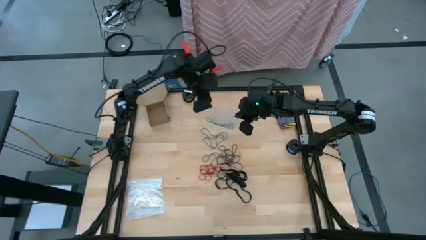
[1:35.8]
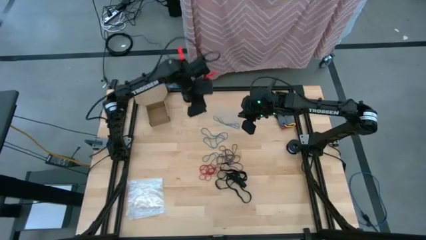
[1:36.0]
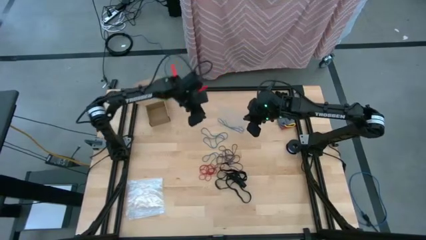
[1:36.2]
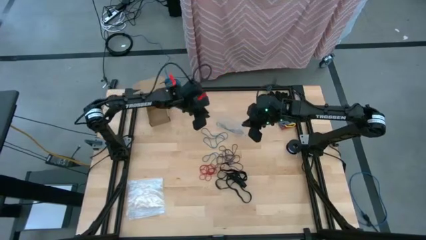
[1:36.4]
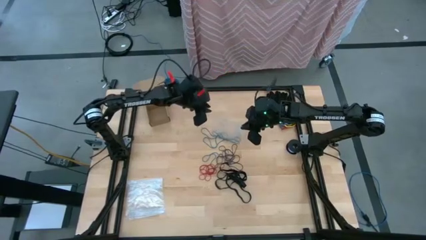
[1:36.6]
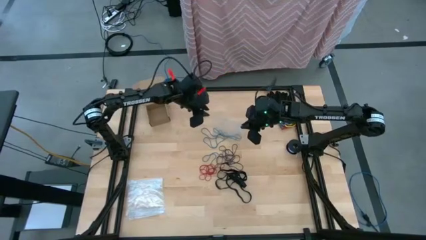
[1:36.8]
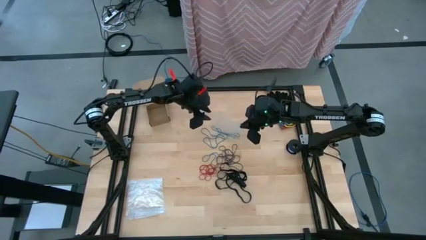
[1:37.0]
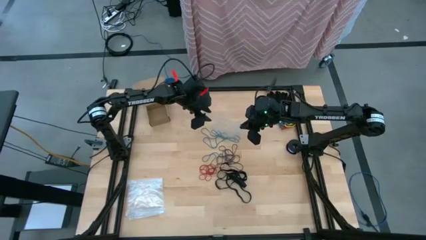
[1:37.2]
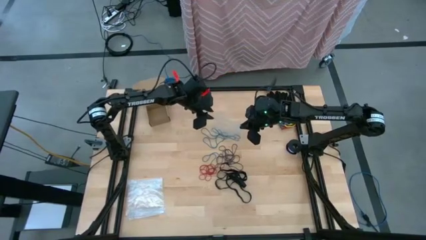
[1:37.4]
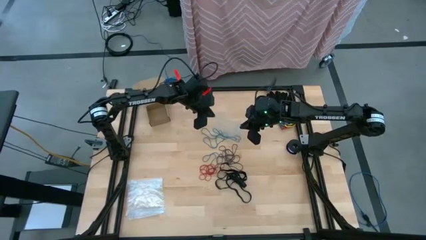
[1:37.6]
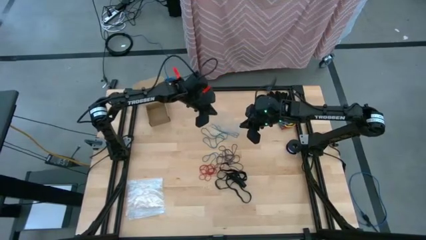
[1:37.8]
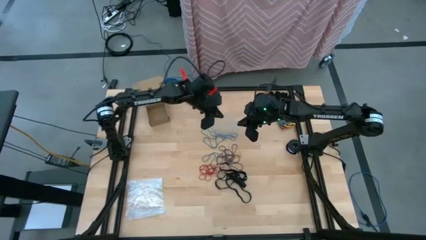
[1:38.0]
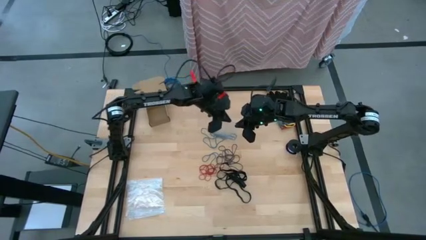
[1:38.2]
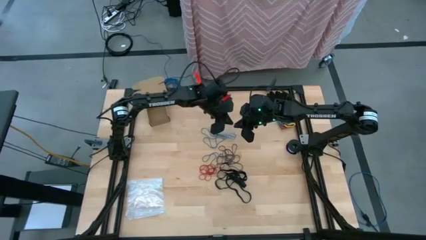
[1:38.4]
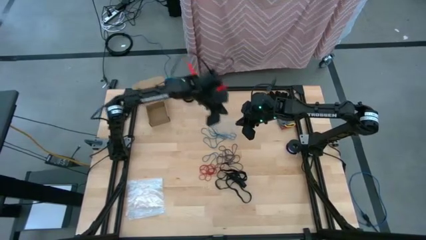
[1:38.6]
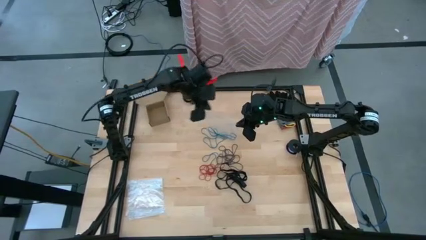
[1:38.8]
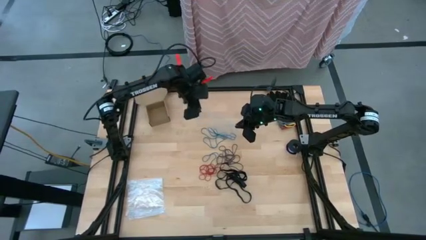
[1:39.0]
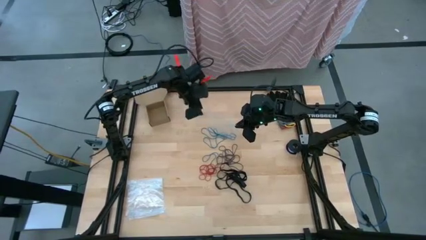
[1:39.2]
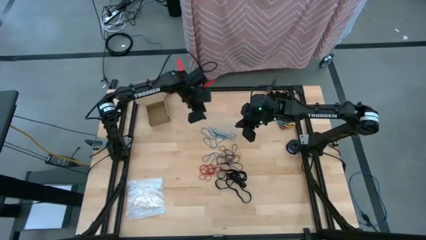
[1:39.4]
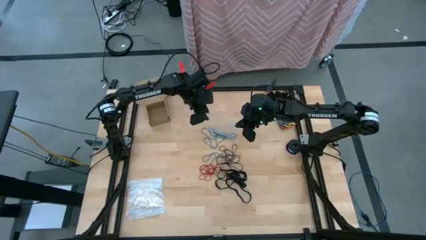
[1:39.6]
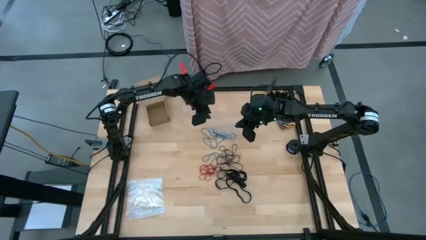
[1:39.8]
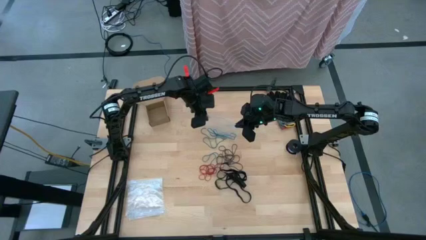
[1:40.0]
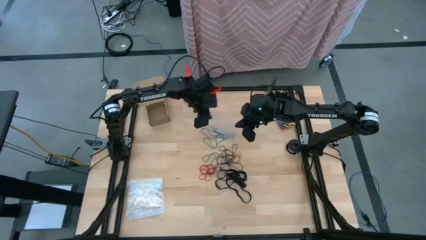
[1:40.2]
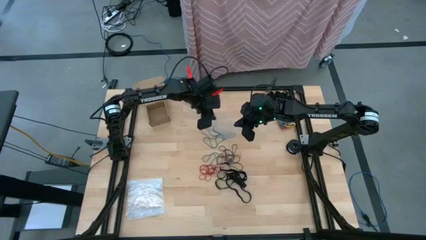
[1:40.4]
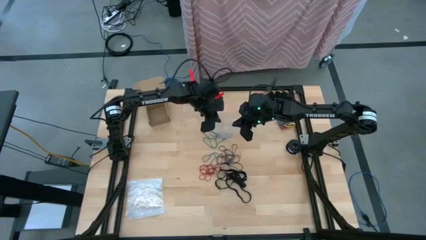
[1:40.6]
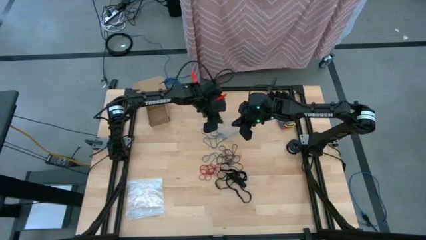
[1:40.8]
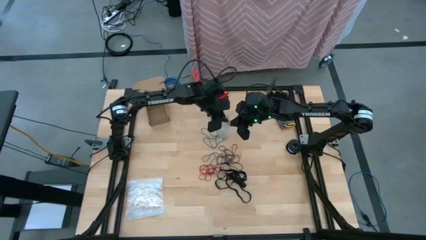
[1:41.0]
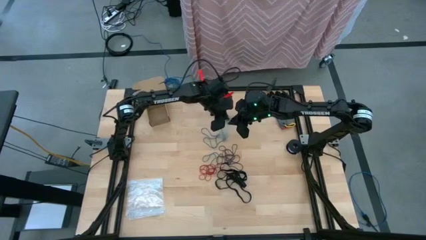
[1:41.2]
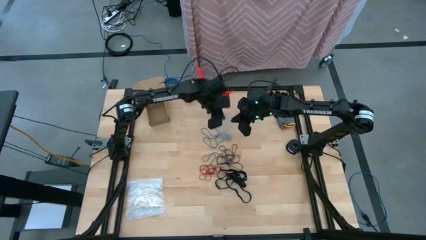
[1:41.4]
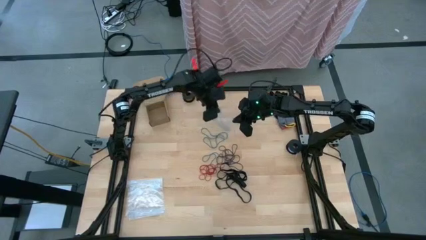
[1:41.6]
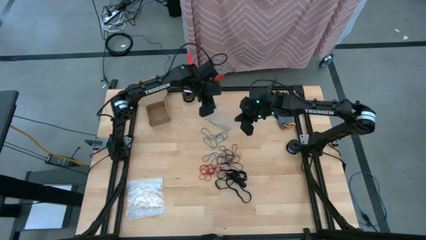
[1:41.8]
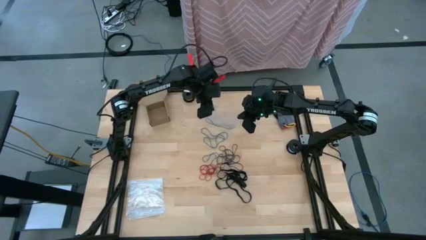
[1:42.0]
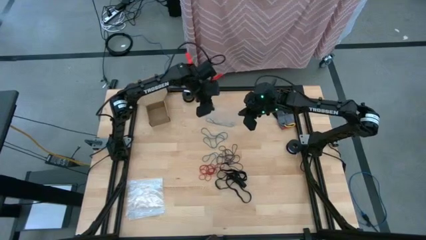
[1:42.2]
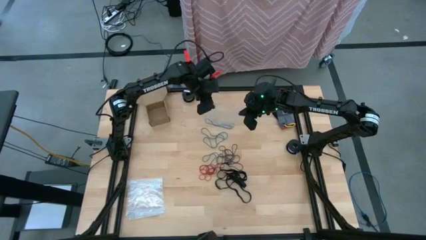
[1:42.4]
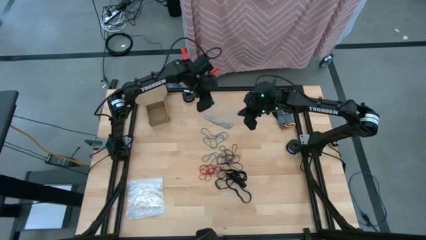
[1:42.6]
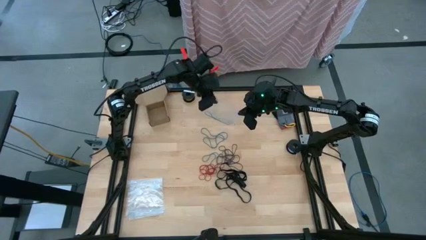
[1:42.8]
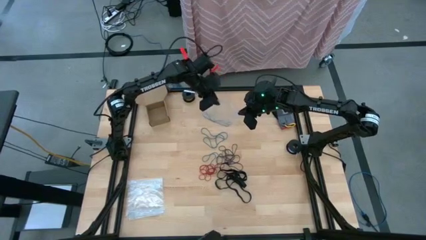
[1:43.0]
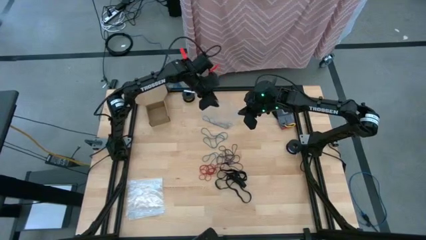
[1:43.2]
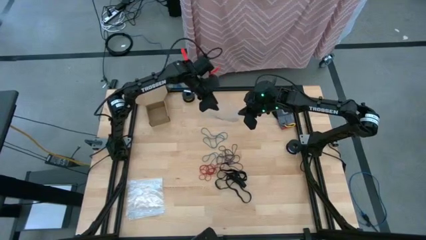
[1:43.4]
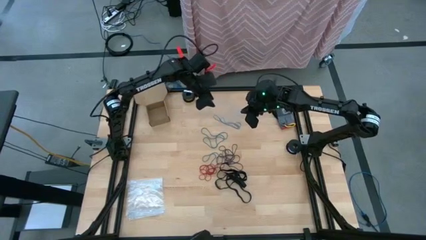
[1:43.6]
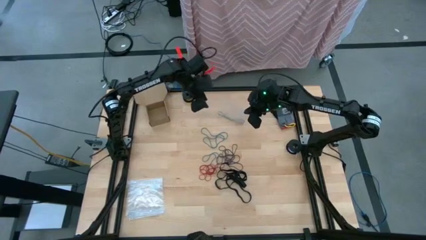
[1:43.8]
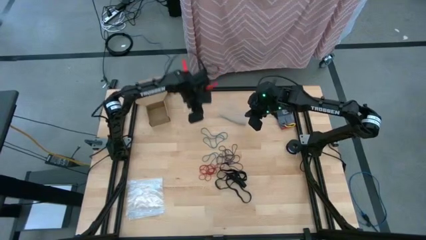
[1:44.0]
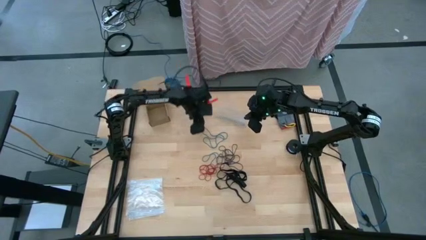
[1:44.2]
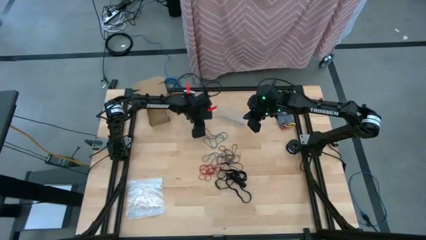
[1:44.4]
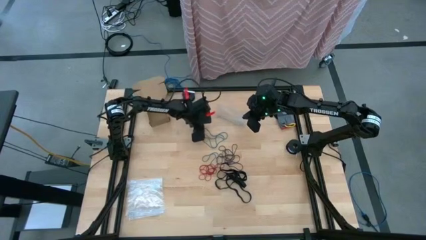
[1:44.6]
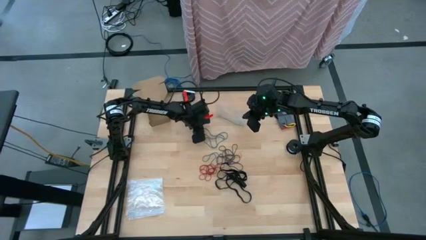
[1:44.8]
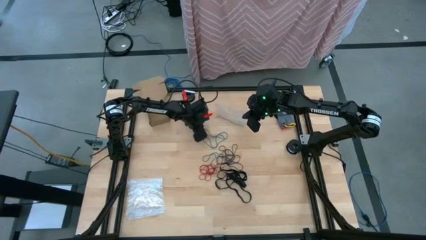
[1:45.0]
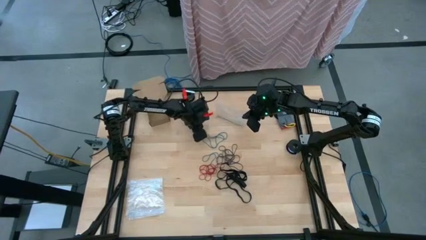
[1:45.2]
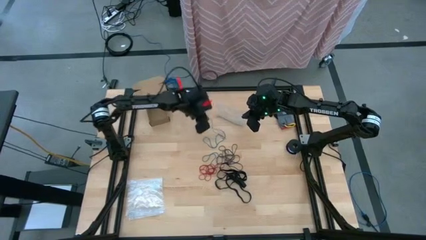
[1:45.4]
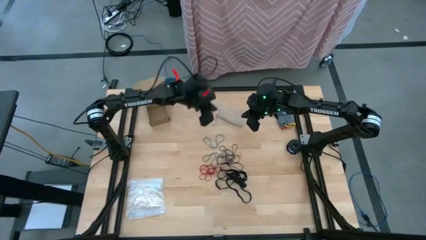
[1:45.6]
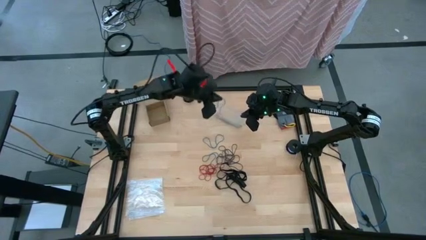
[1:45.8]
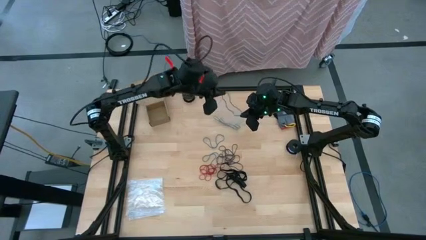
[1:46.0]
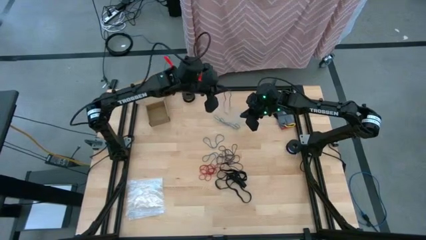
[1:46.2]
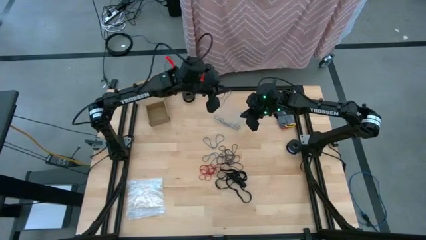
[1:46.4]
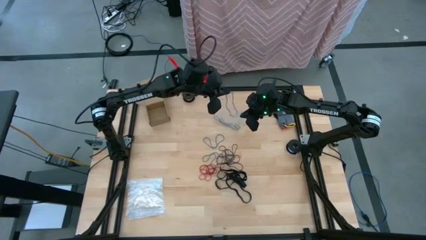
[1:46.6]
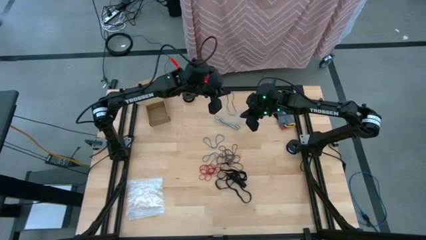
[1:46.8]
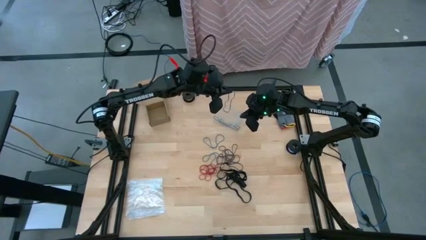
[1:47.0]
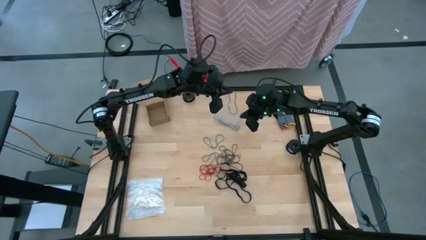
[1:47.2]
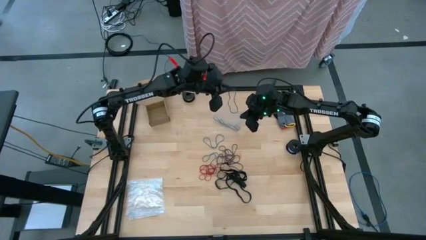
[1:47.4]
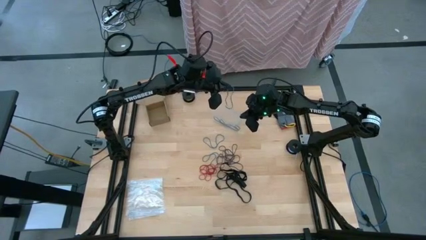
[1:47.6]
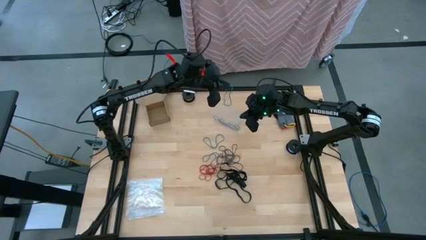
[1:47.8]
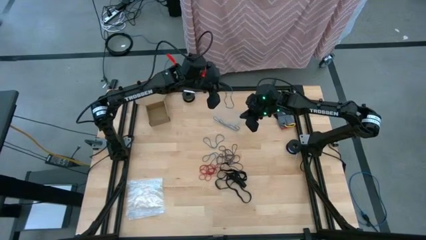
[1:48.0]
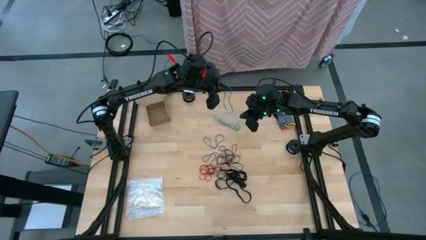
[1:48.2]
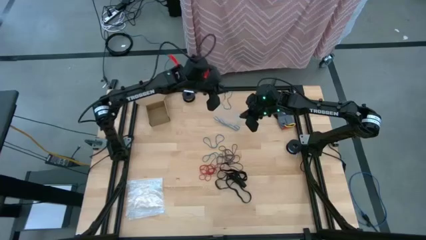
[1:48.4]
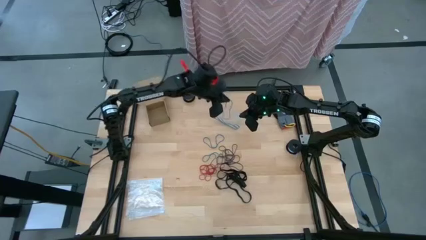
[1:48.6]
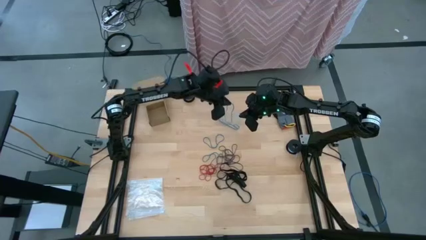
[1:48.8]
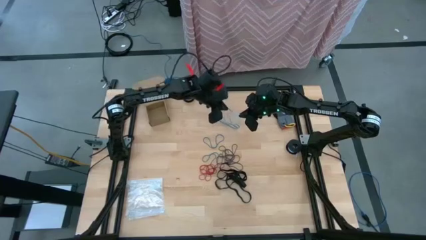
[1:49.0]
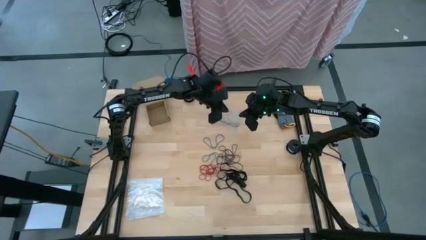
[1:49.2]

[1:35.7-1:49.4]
Task: Sort rubber bands
Put the blue rubber band into the transparent zip bag

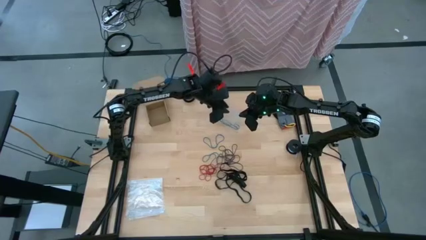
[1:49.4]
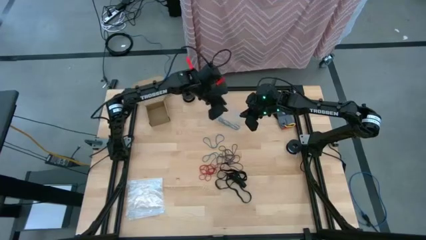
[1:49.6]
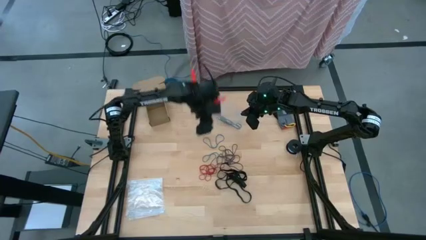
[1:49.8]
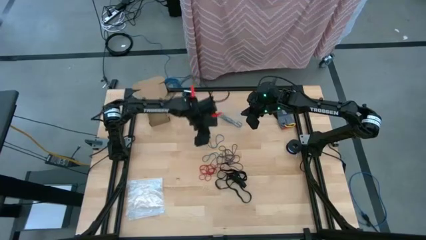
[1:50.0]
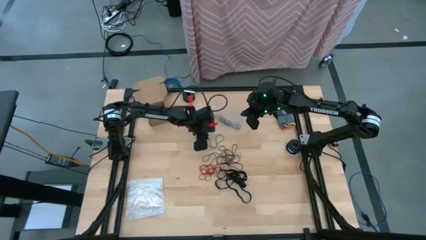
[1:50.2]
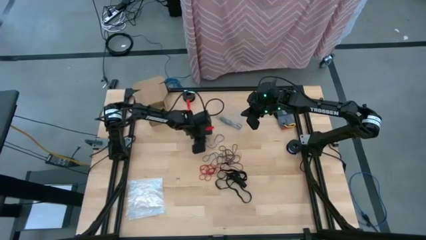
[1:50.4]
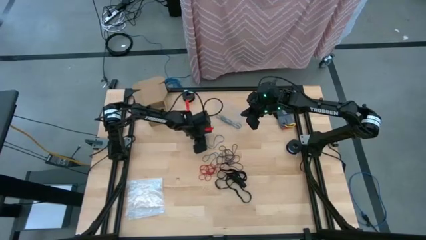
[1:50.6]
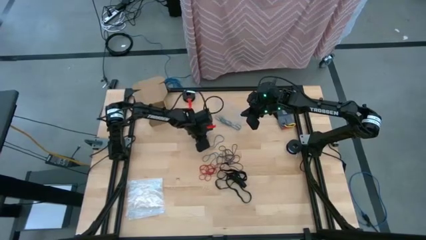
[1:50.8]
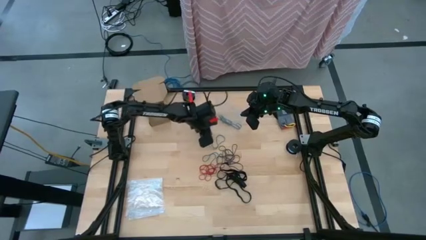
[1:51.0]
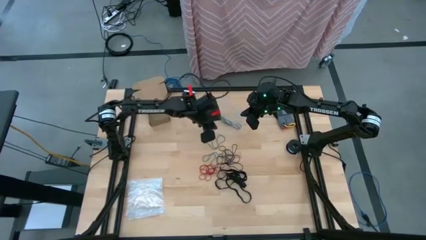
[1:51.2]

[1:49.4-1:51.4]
Put the blue rubber band into the transparent zip bag
